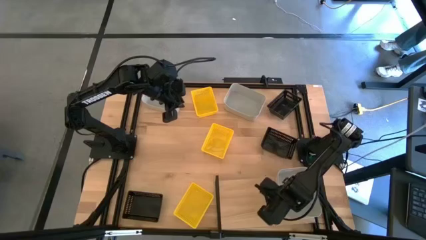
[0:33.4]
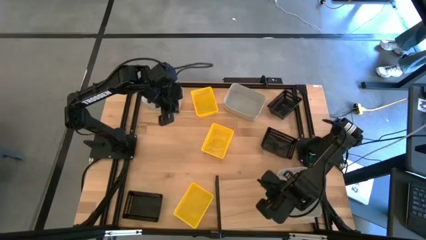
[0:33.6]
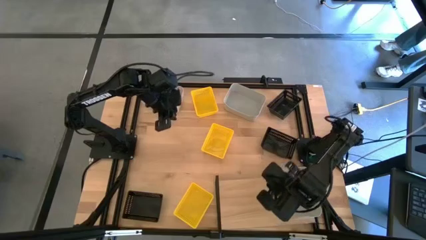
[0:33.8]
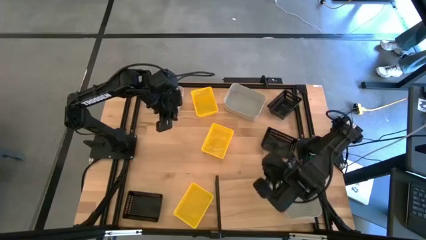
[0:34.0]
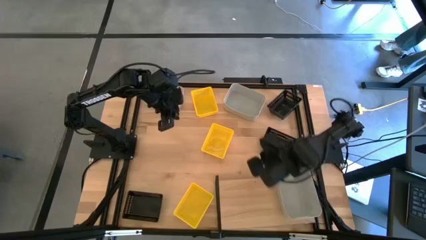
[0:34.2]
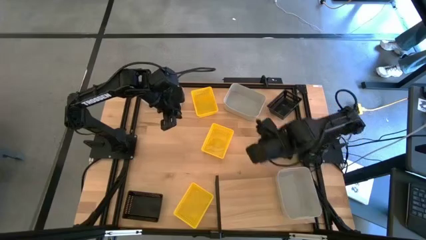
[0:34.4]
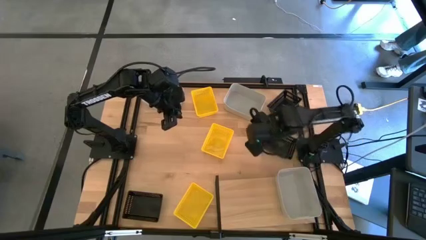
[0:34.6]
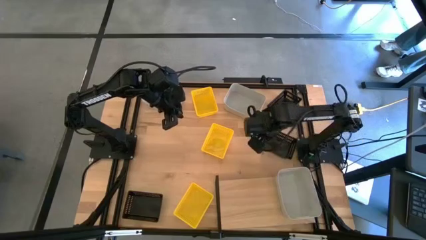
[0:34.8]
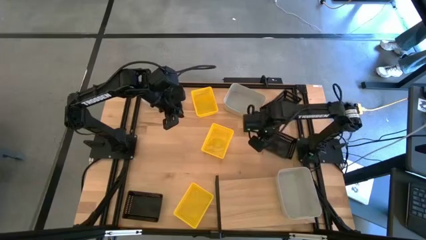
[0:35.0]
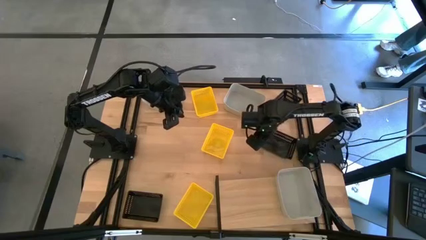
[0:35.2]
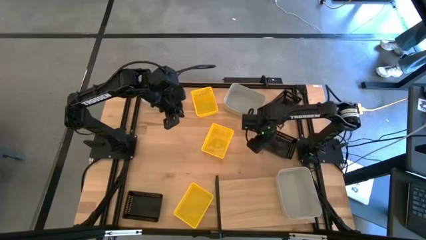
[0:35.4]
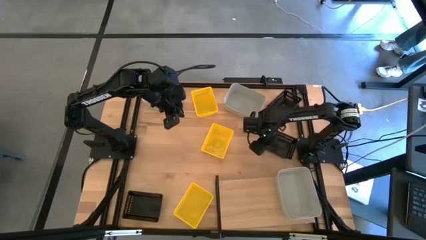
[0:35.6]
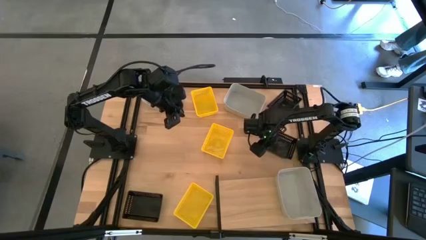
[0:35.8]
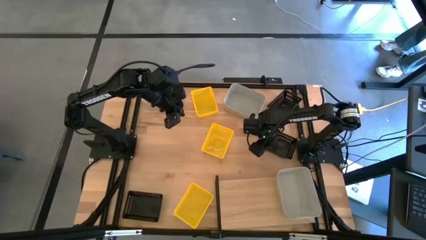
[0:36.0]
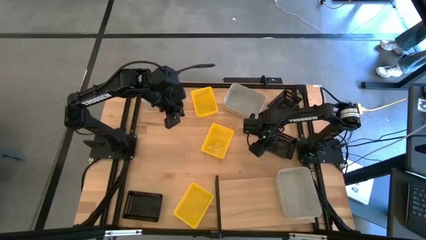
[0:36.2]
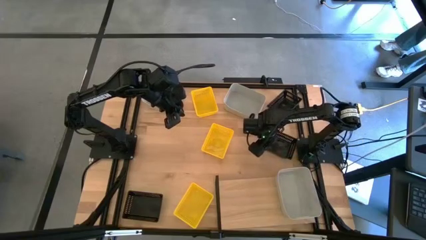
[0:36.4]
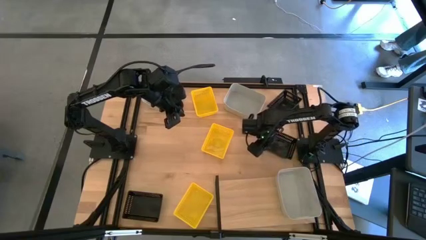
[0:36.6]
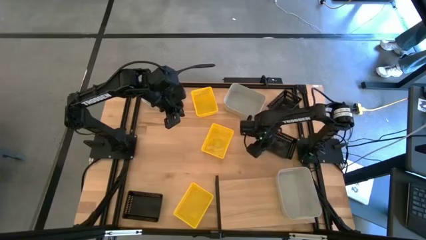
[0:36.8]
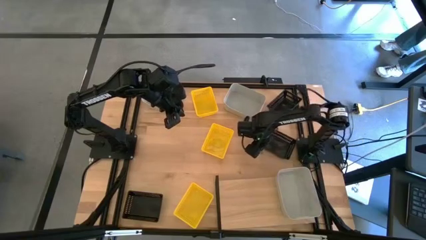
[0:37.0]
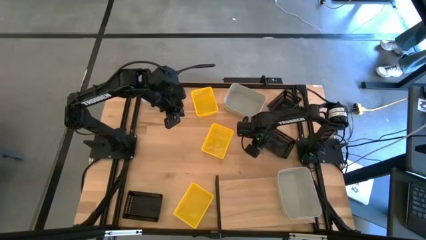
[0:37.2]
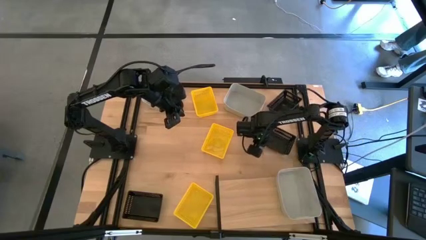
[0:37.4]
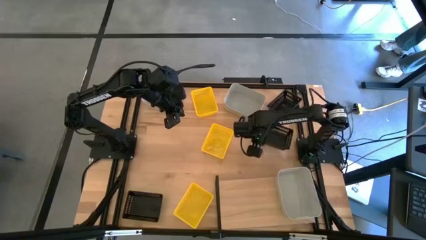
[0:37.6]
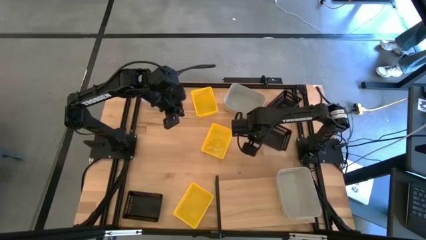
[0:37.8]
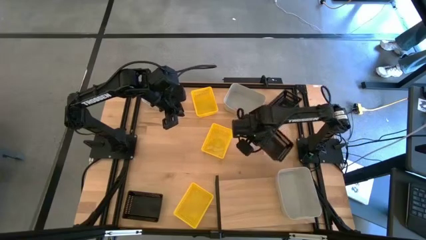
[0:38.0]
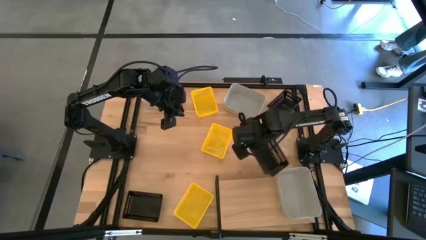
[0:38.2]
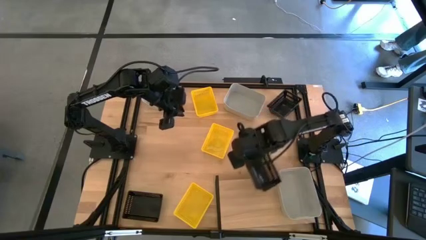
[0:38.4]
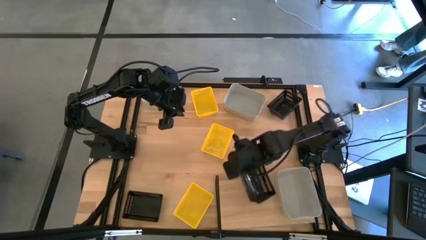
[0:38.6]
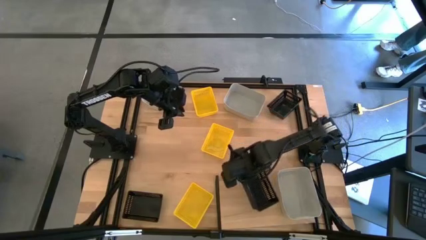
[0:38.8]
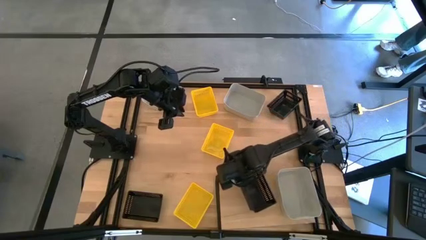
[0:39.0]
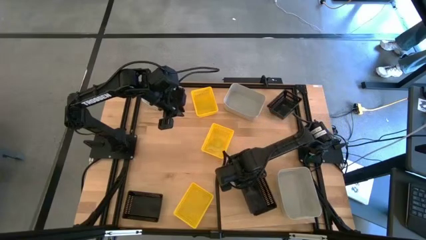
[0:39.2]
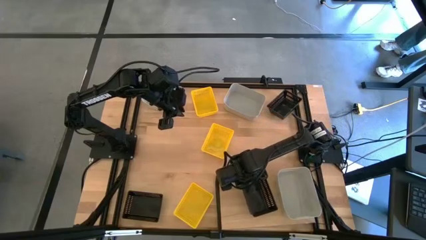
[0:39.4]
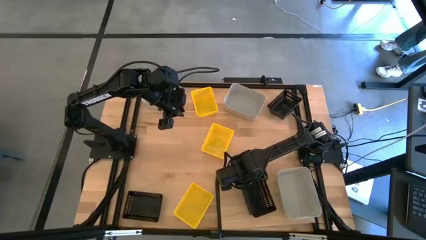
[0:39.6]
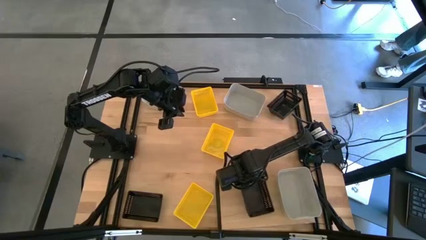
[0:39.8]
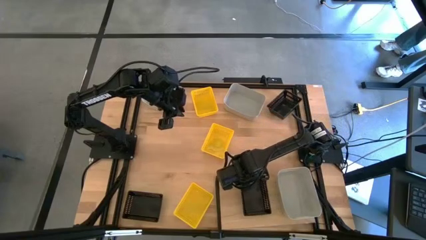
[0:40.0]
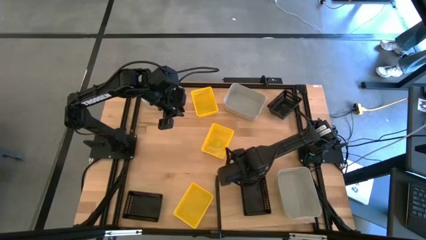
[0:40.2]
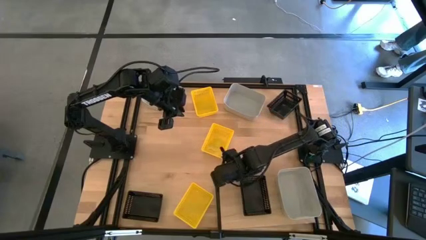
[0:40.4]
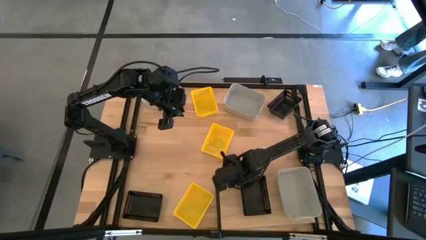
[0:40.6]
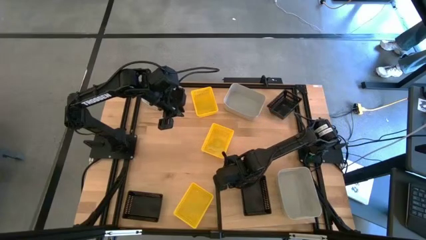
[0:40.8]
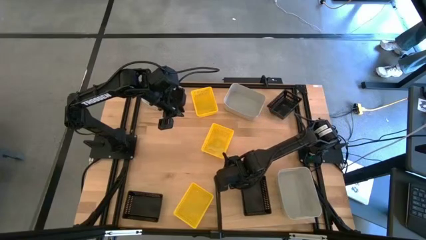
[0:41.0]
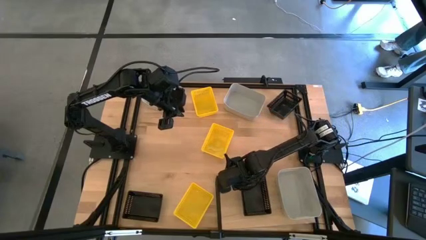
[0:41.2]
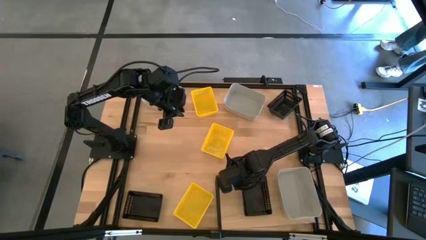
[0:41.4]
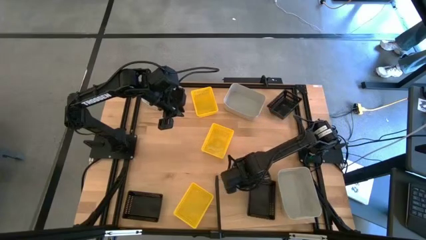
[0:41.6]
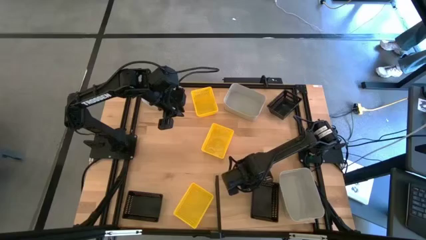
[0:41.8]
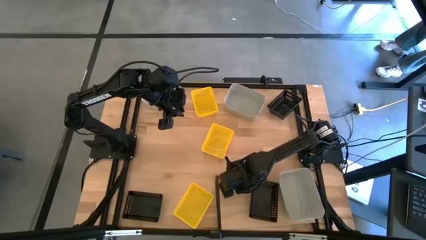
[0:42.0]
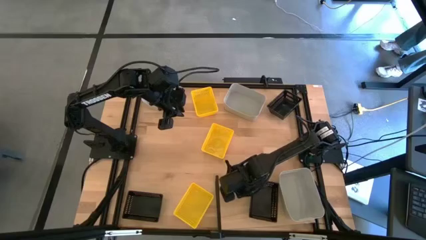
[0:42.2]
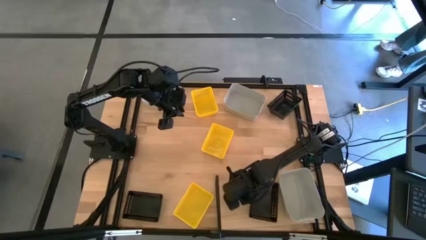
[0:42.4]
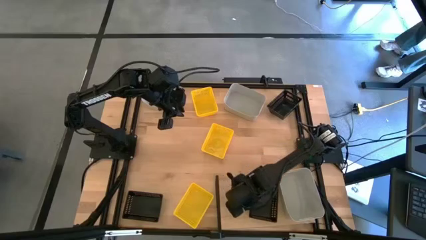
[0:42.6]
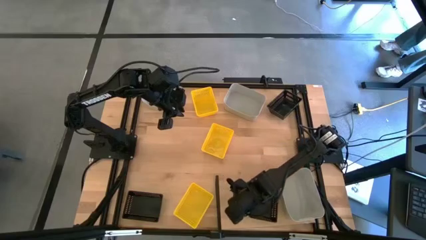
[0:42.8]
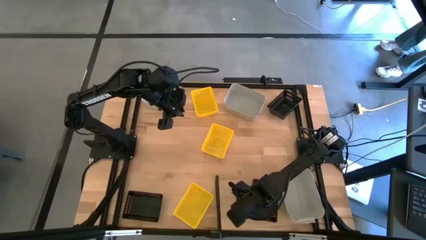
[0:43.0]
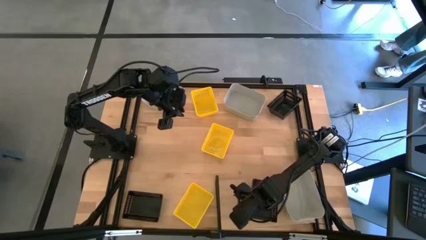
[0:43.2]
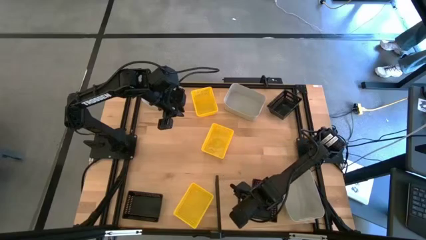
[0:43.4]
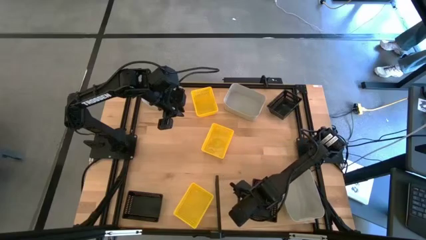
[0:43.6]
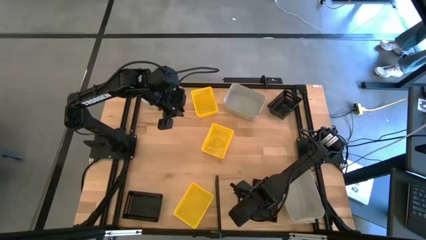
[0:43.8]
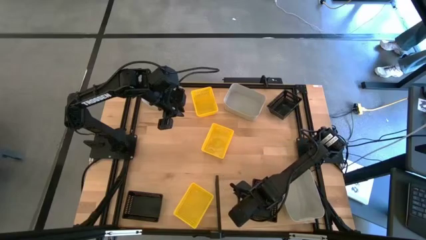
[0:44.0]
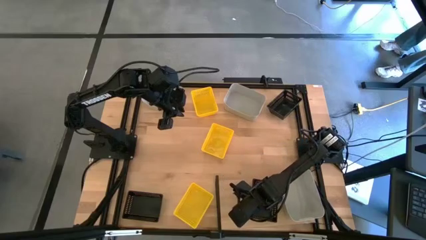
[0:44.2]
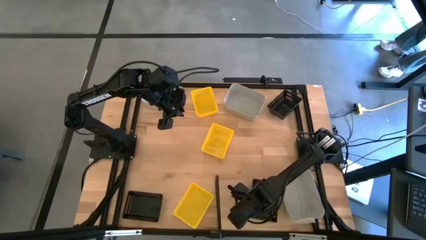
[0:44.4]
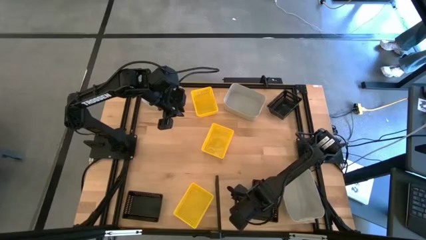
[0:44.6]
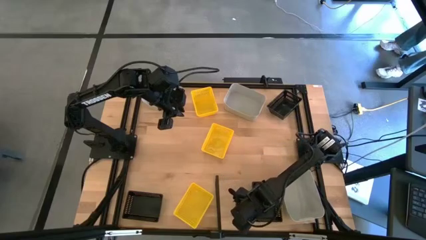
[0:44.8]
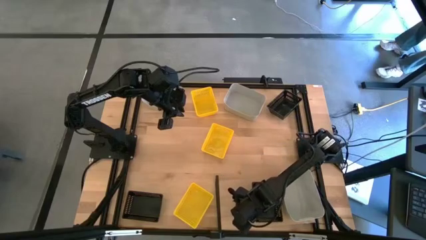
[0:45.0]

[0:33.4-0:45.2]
Task: Stack baskets on shelf by color
Put the middle black bin on the shelf

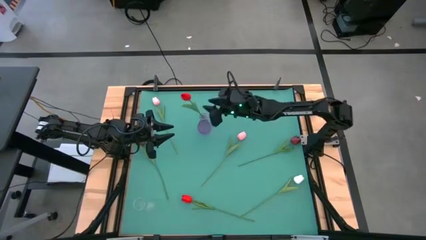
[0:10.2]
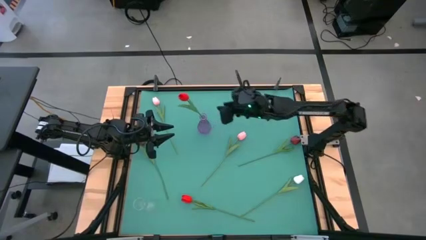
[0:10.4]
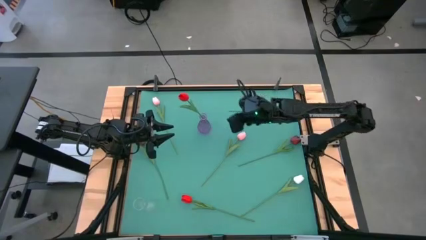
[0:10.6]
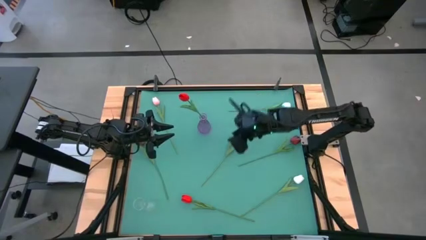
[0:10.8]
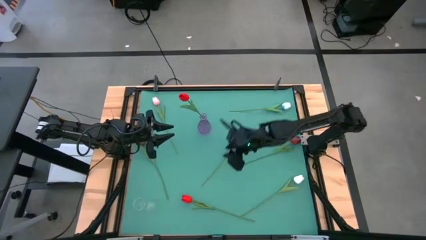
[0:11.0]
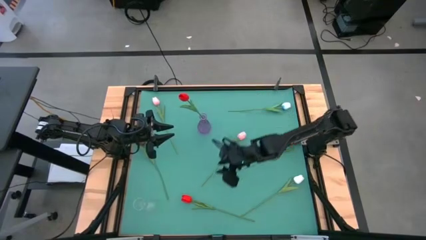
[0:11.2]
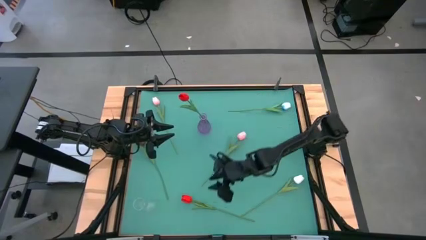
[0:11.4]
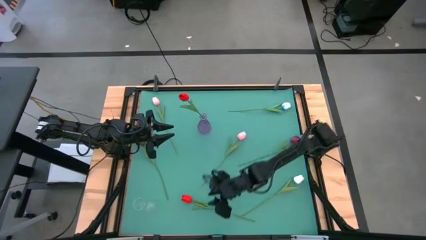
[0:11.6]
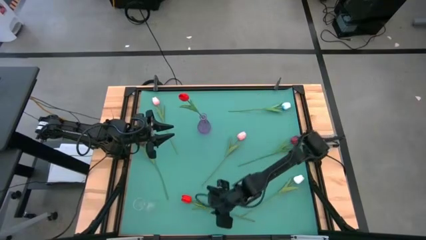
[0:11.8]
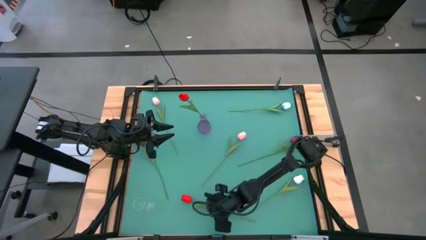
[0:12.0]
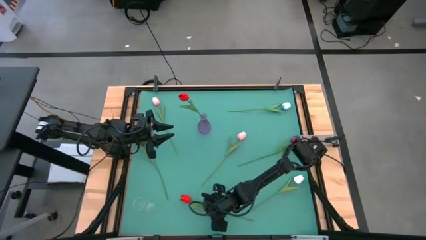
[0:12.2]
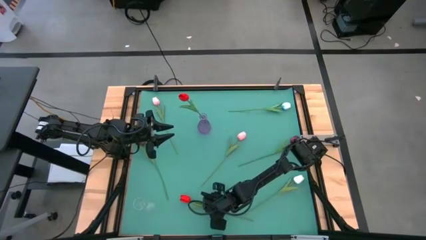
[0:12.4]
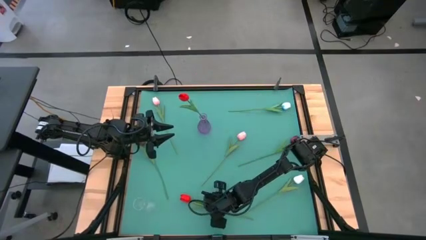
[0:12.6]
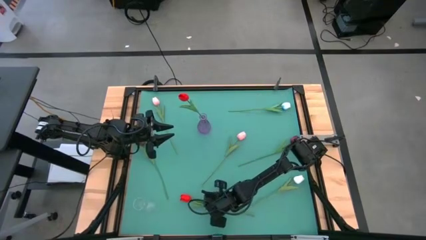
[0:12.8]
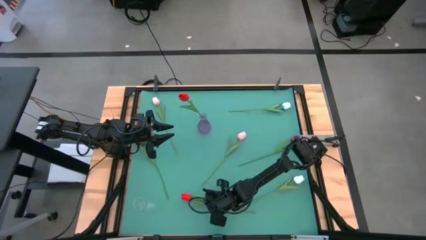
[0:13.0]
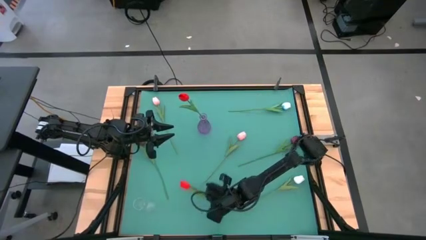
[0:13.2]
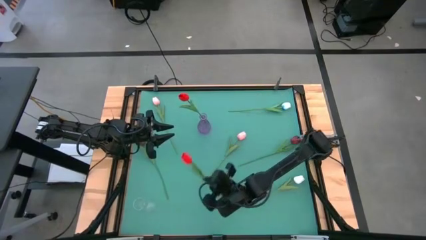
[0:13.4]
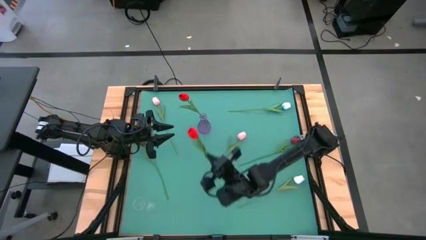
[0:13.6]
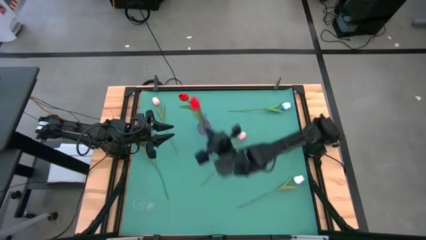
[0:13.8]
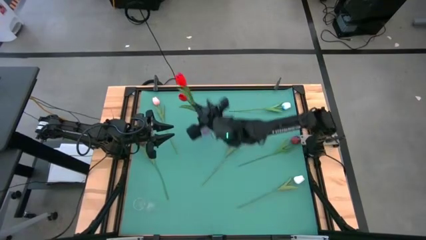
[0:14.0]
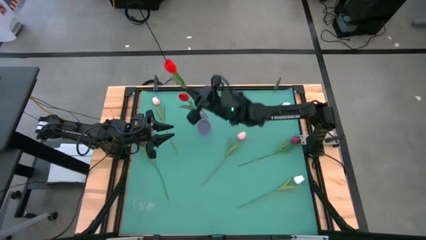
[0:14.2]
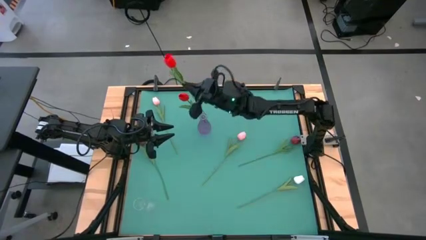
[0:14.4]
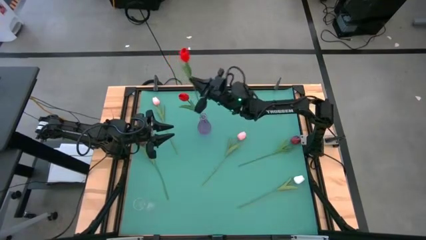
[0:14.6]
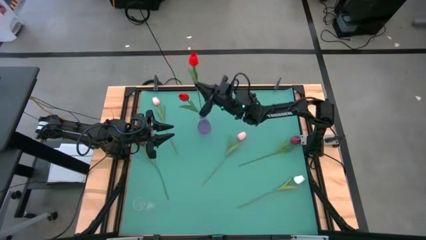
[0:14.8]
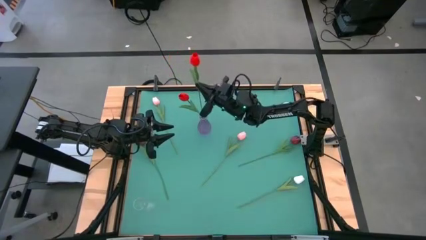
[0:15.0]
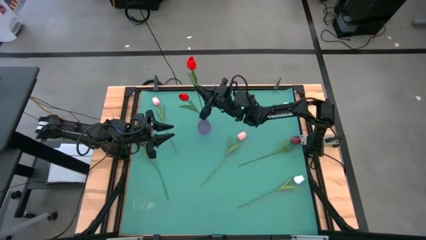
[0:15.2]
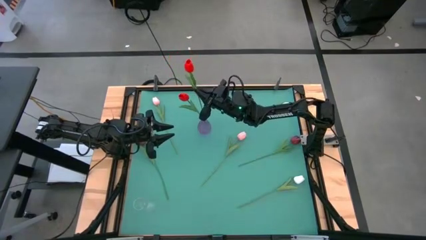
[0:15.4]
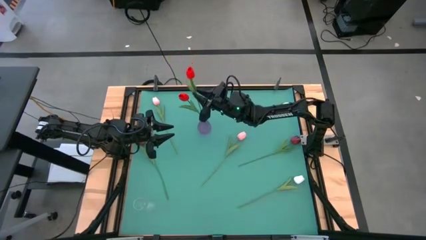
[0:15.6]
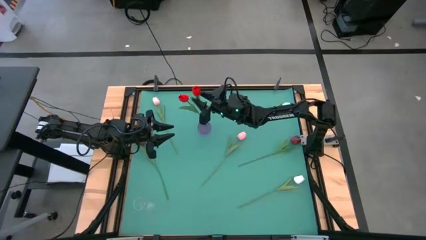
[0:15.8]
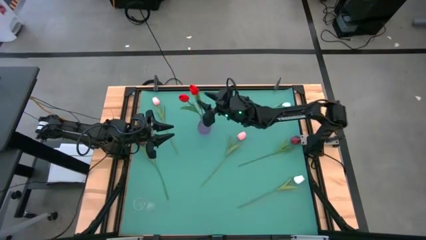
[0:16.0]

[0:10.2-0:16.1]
Task: Sort flowers into vase by color
Put the red flower into the violet vase
